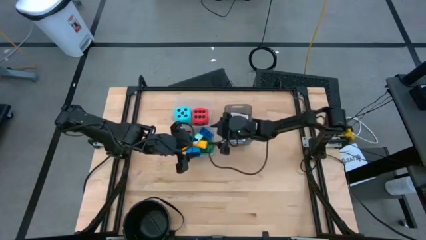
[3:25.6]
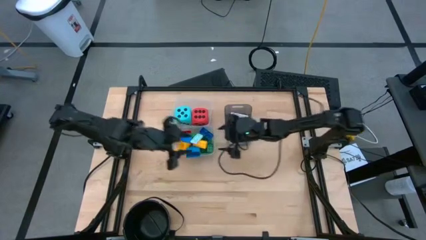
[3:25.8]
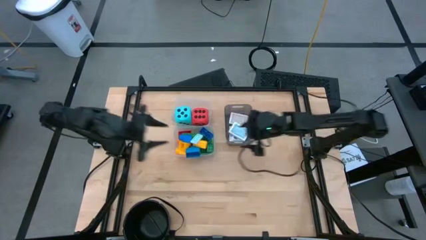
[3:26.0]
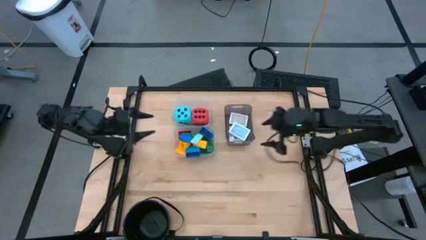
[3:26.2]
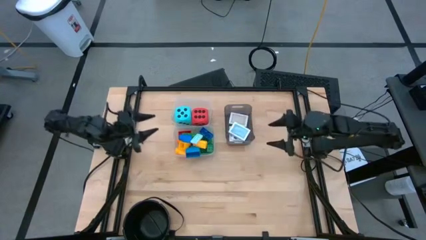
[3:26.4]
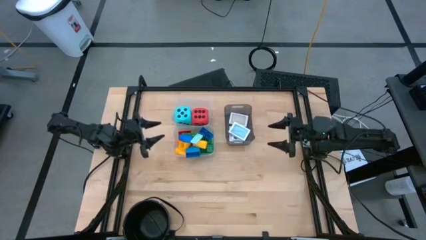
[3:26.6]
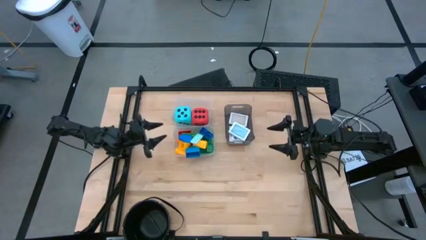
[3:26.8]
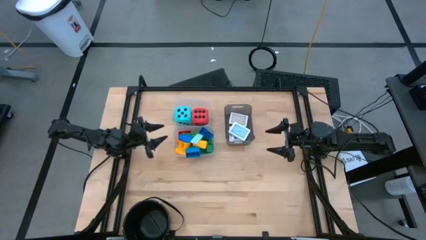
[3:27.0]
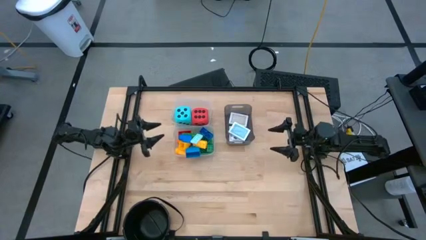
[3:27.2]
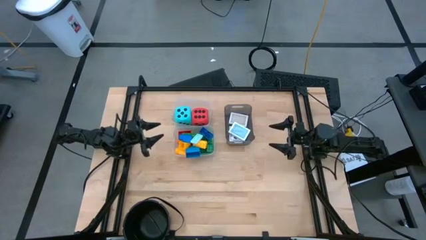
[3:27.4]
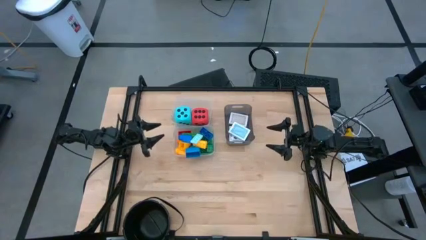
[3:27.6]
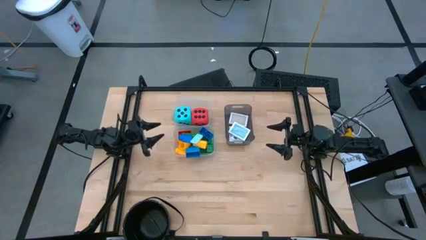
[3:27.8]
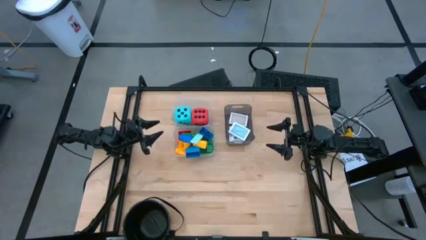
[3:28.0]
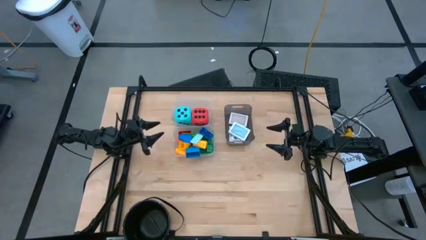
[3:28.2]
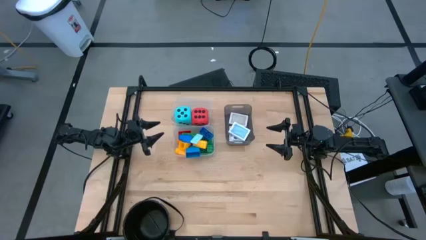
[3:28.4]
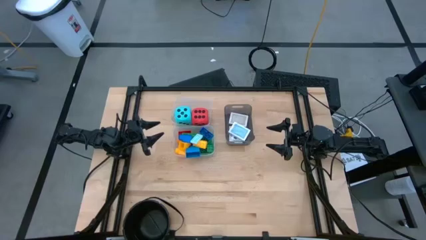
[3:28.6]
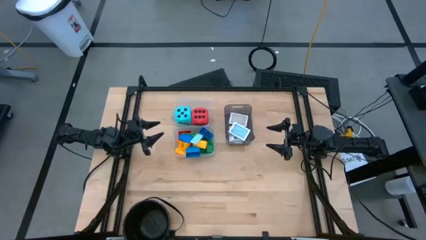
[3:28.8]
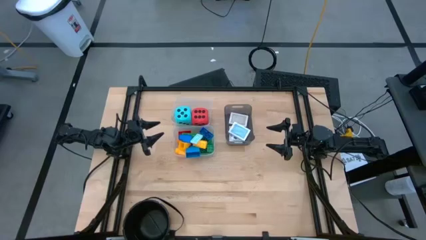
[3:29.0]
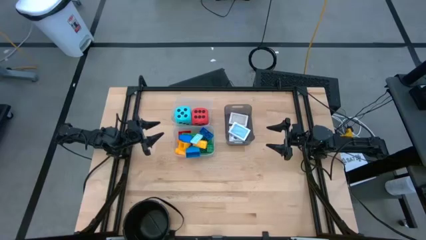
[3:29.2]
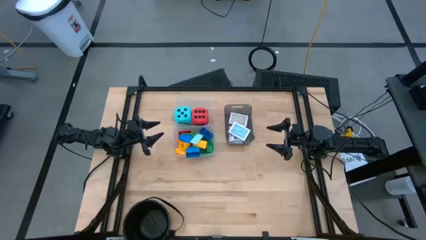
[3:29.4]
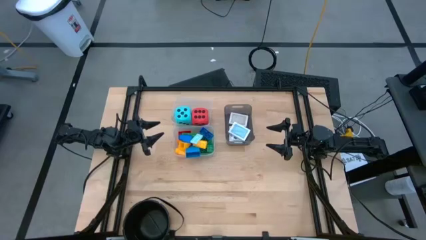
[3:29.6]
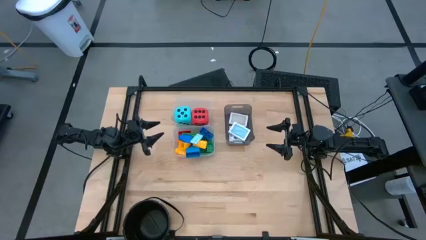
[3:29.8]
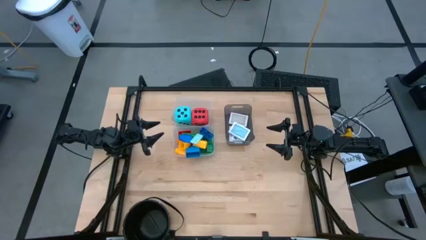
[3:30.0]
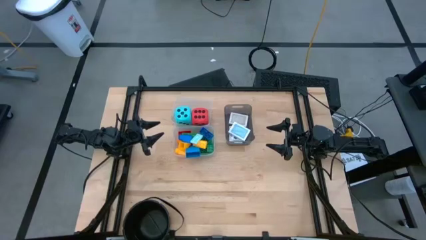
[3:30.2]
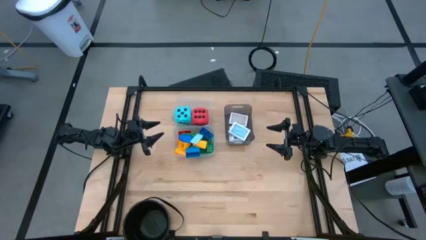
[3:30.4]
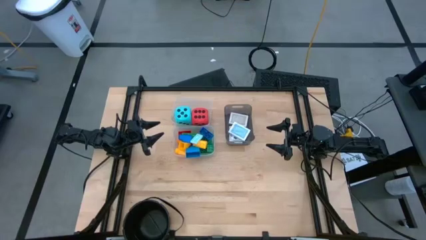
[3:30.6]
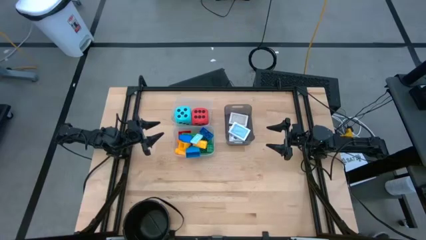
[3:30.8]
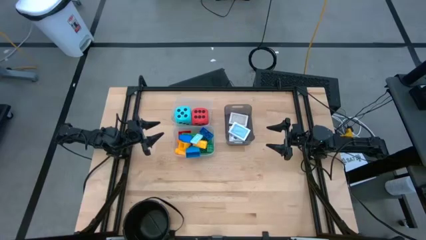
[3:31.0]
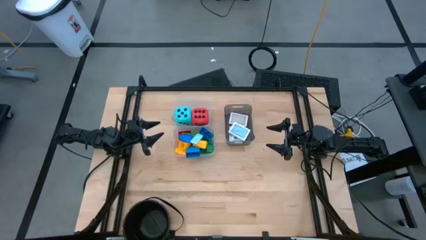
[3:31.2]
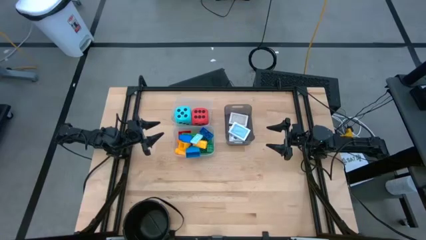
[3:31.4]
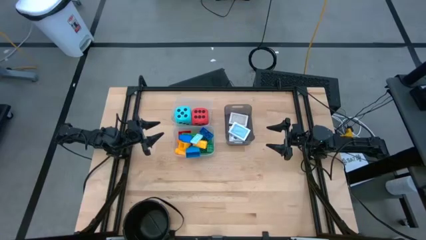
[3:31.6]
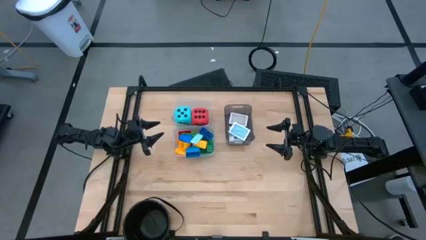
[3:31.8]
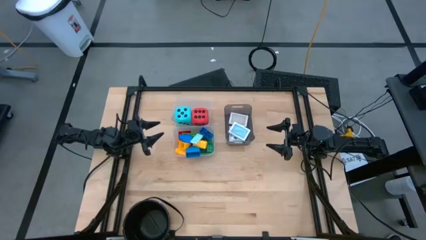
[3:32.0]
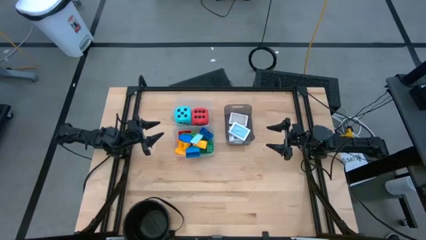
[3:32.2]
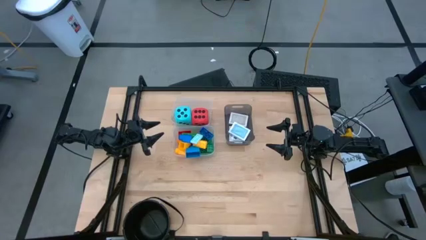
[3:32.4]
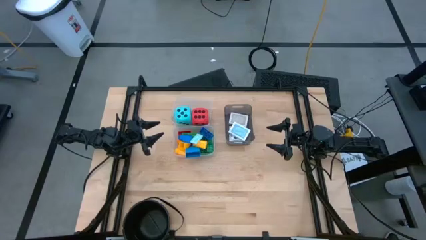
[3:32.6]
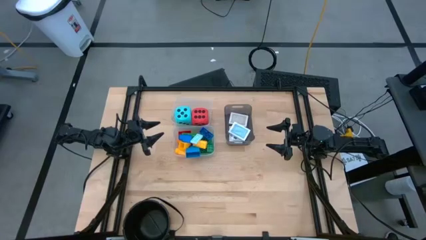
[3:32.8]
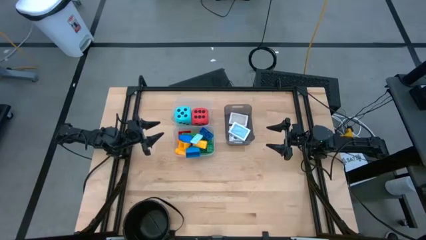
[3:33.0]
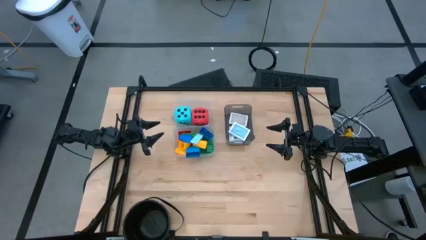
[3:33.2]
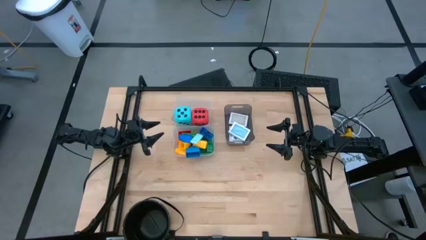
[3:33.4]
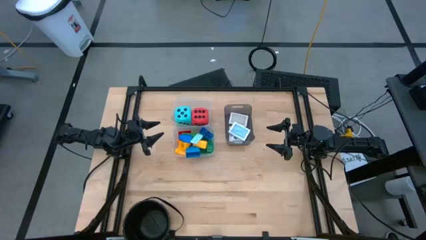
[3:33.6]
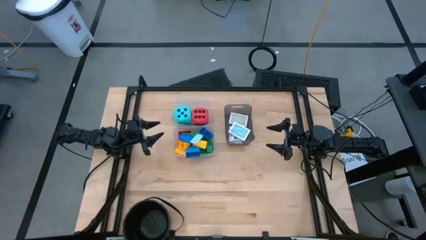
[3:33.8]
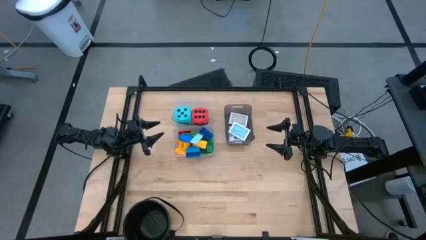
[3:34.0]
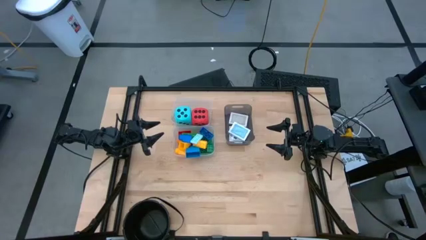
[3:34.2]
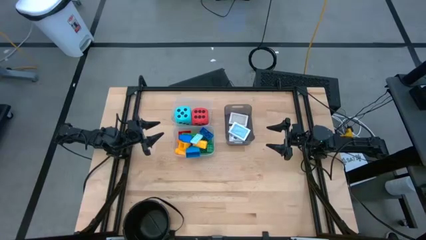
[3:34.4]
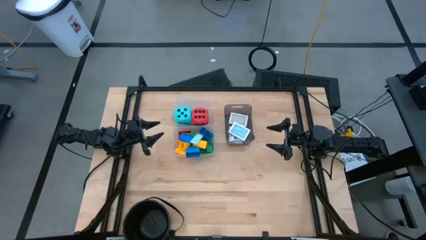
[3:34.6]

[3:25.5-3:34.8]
Task: Pick & Place Toys
Return to Home Position

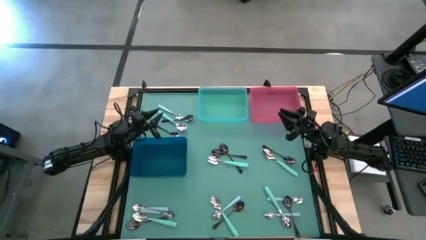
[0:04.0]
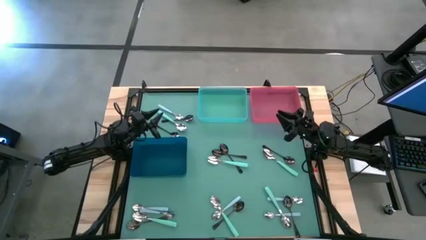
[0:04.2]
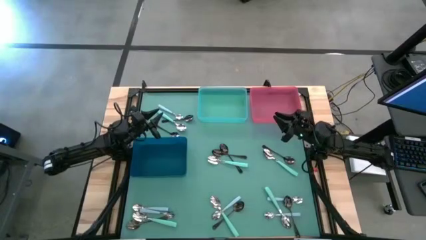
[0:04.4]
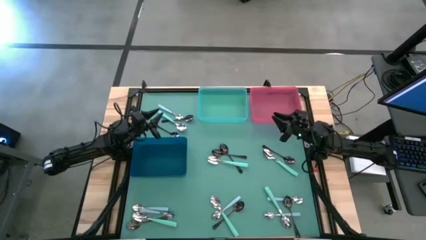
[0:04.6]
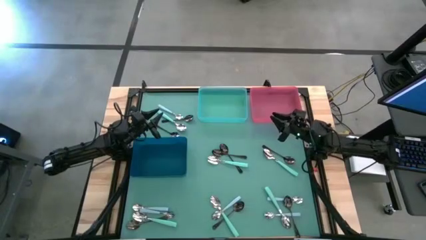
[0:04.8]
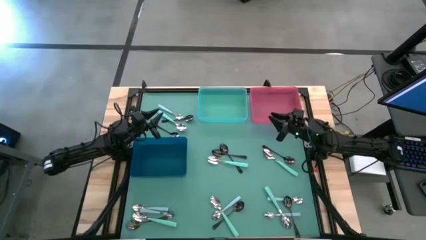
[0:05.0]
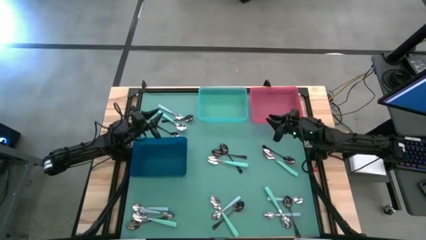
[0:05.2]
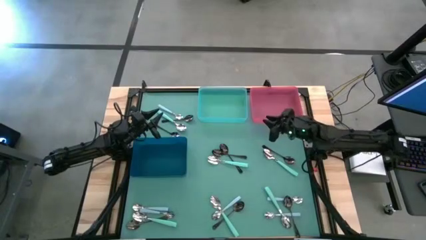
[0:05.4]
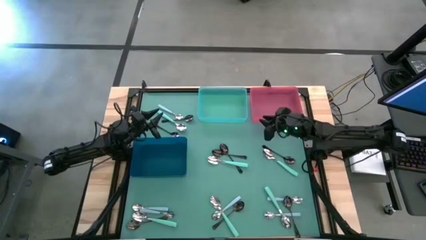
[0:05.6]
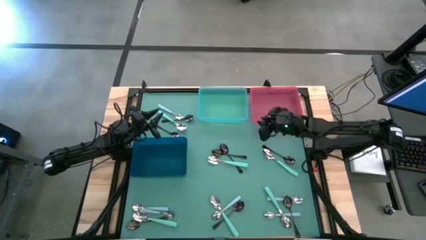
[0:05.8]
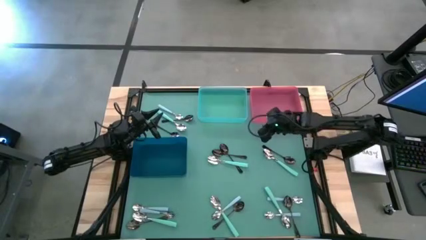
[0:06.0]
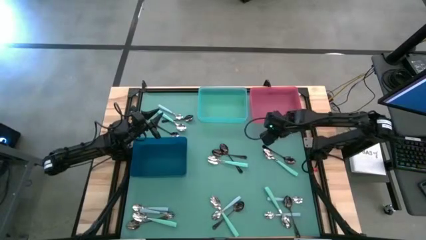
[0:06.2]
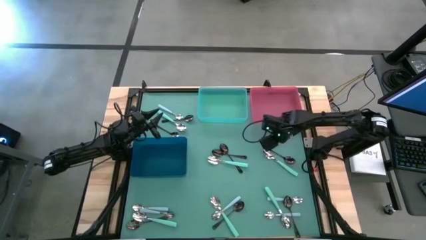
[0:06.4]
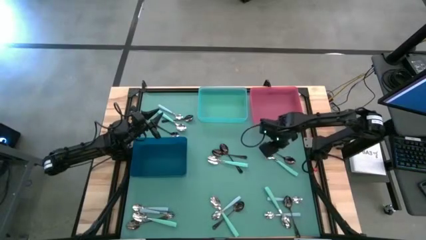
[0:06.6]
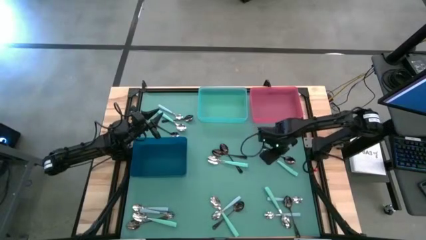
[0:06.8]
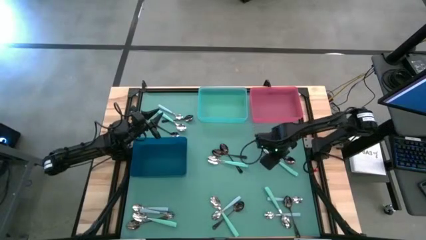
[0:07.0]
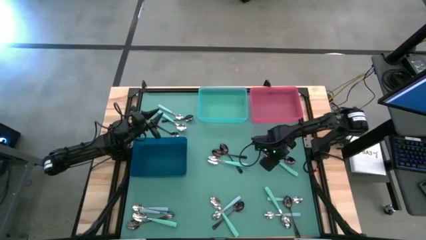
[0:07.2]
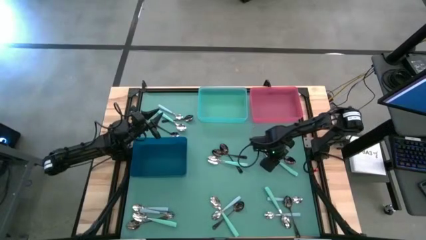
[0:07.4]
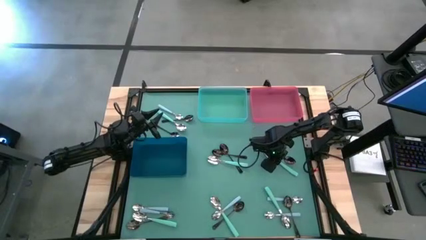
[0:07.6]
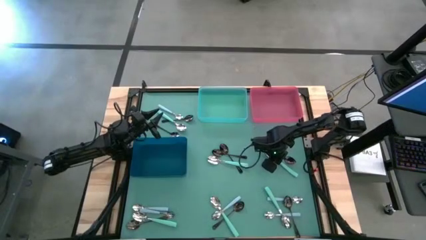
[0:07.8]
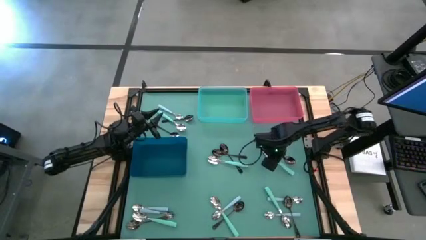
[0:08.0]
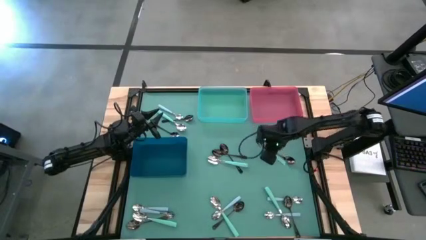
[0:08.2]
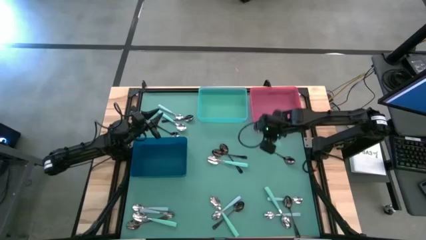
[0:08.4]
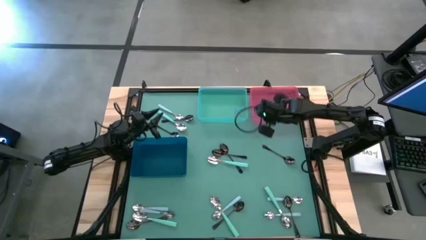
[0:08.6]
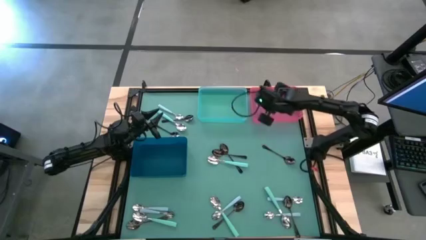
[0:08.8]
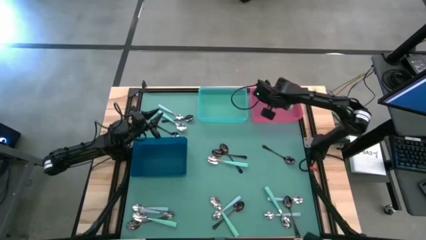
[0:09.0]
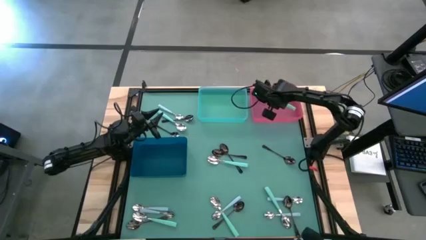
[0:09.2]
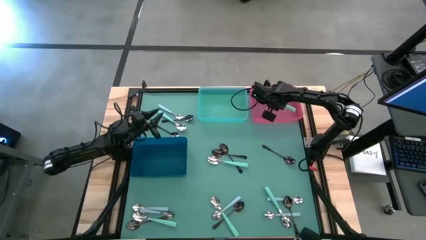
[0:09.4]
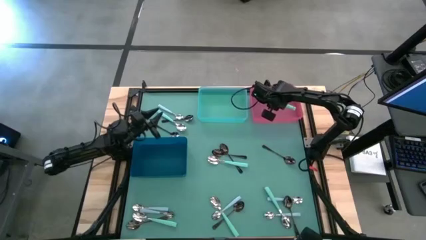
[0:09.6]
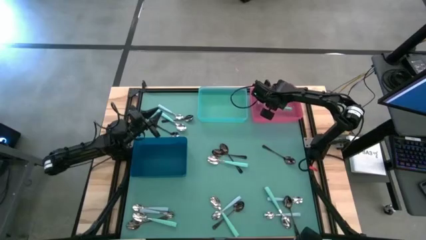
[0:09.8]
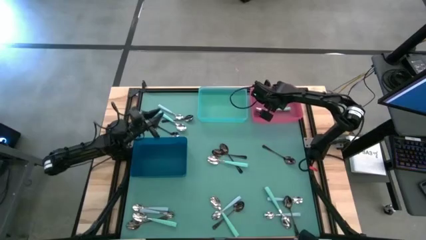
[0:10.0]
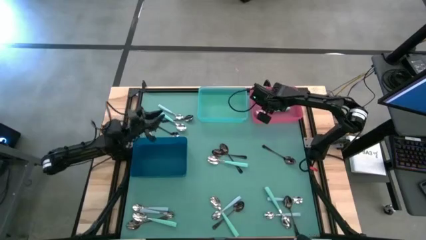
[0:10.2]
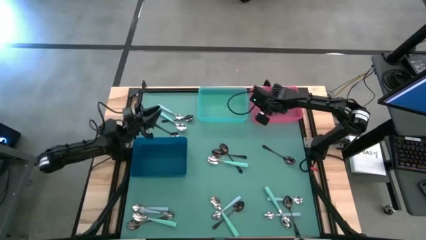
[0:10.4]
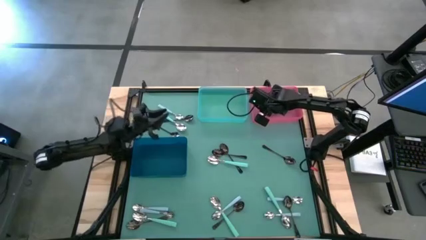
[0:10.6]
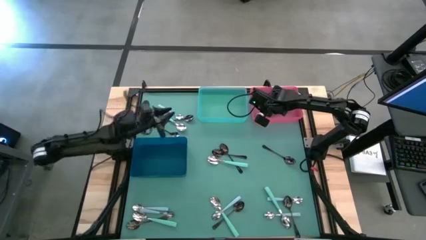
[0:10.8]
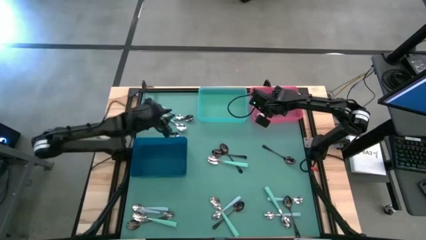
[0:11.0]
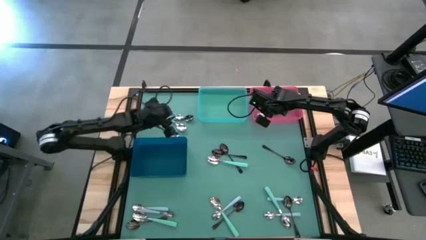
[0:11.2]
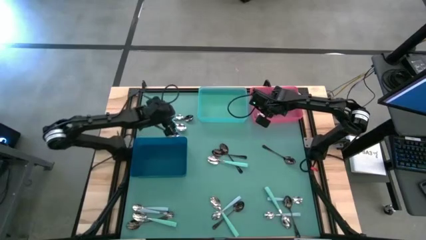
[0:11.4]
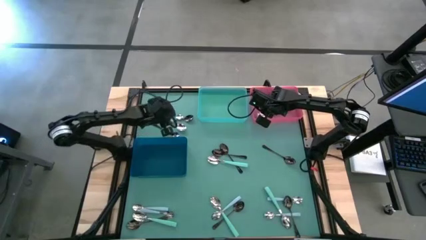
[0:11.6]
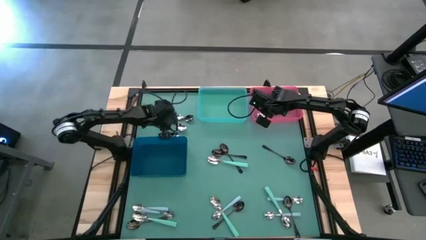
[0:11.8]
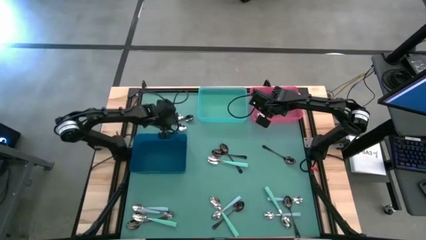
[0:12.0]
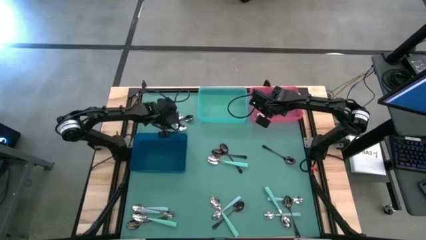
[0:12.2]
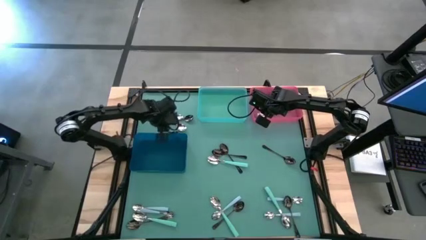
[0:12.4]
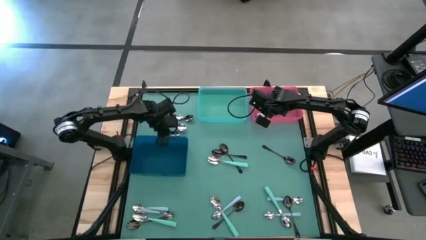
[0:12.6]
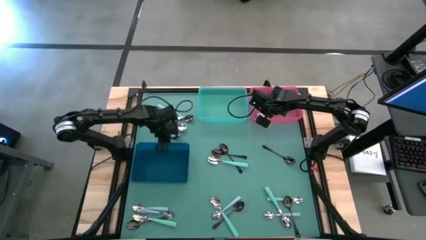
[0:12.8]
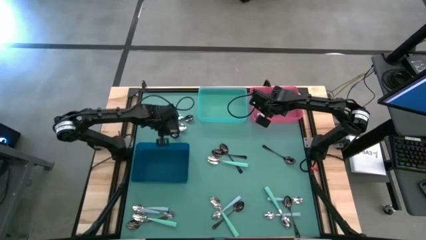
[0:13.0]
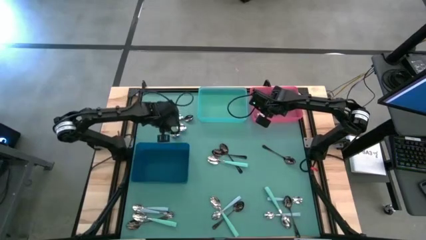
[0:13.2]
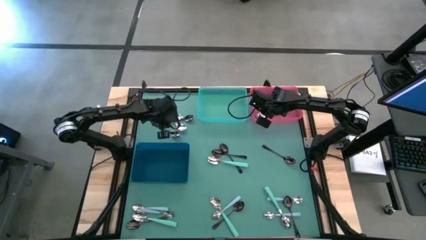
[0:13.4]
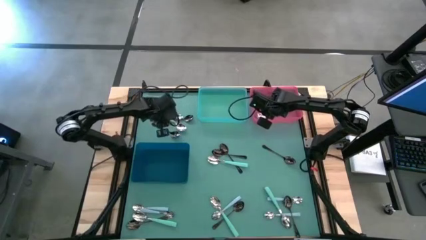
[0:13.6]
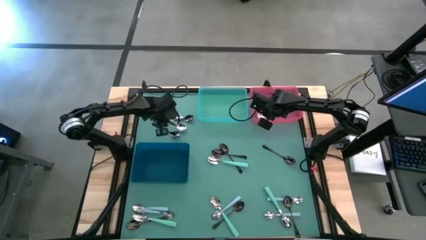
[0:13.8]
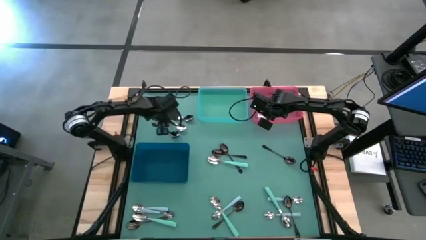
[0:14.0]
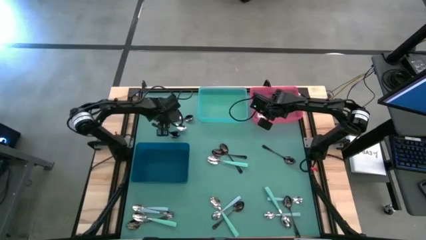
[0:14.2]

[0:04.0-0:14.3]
Task: Sort silverware by color (type)
Put the center right green spoon into the red bin
